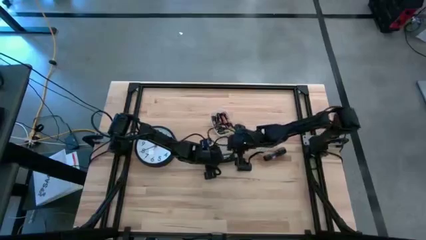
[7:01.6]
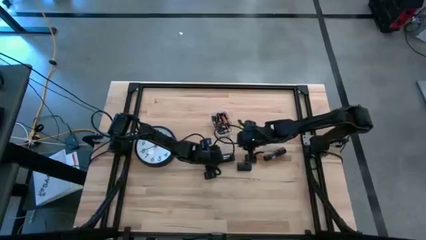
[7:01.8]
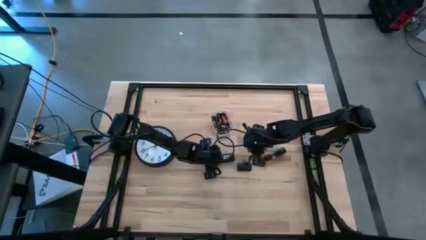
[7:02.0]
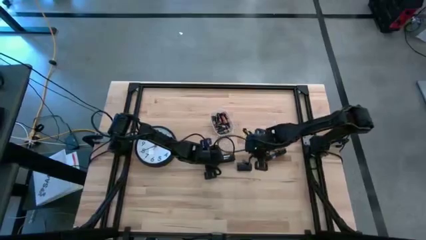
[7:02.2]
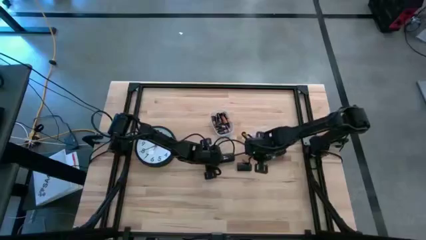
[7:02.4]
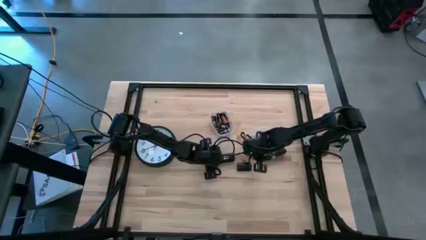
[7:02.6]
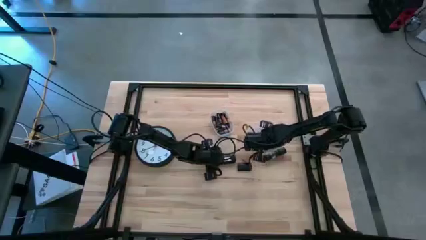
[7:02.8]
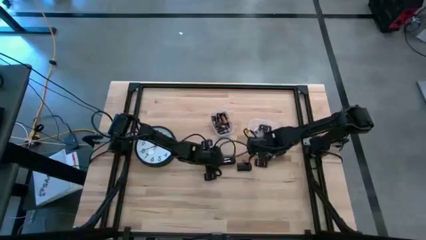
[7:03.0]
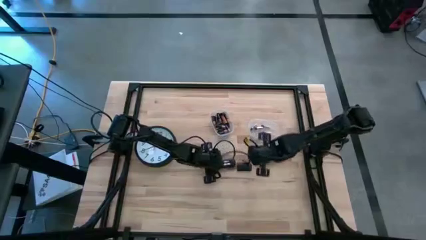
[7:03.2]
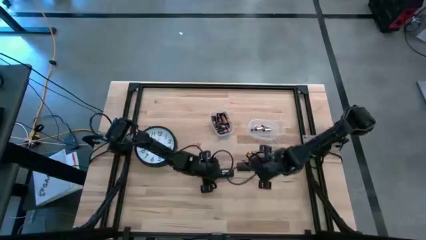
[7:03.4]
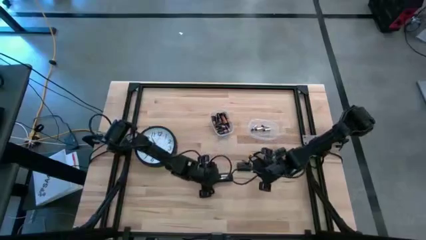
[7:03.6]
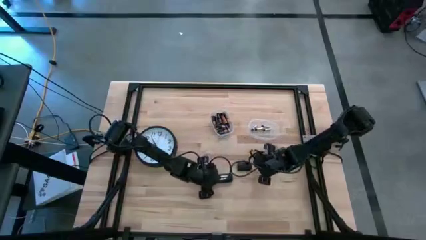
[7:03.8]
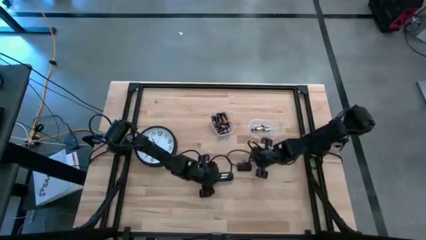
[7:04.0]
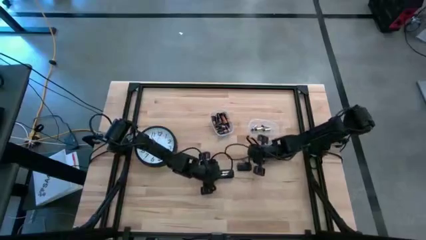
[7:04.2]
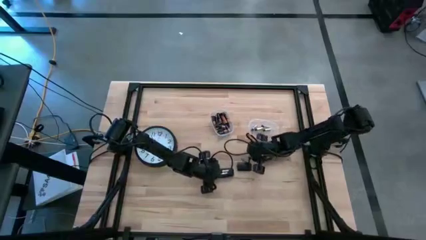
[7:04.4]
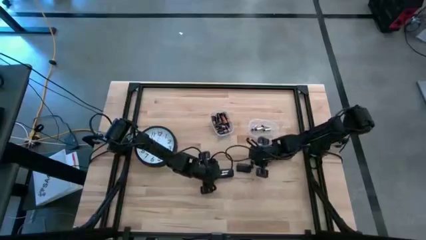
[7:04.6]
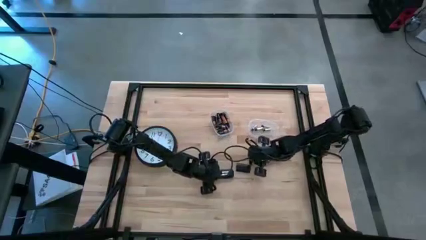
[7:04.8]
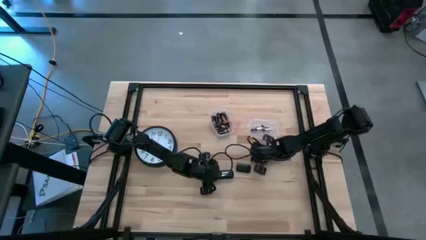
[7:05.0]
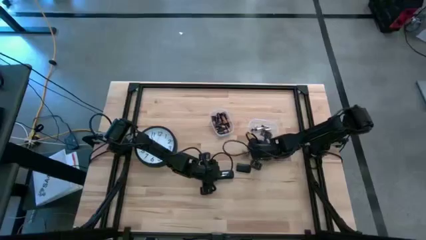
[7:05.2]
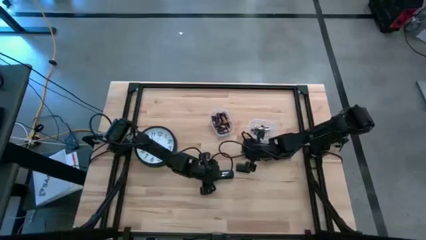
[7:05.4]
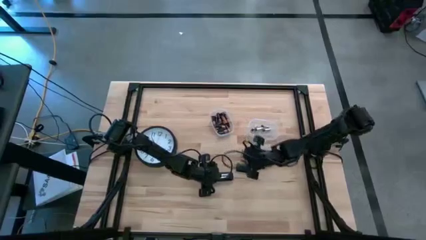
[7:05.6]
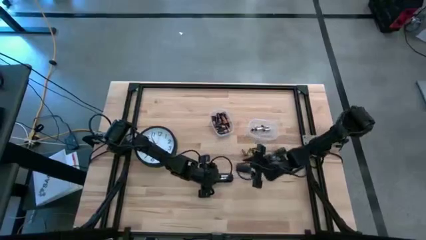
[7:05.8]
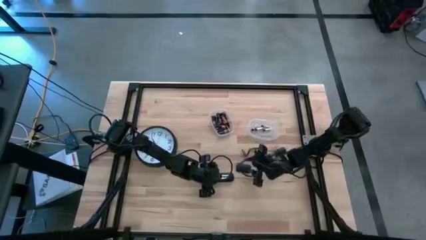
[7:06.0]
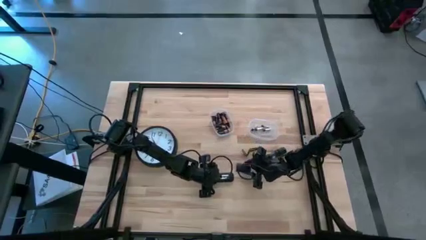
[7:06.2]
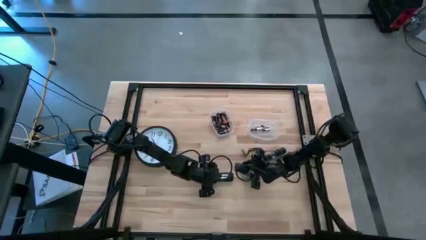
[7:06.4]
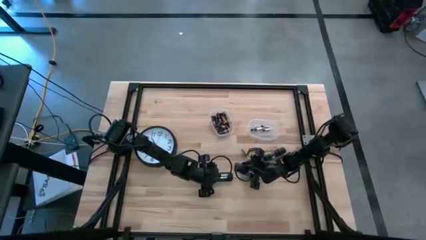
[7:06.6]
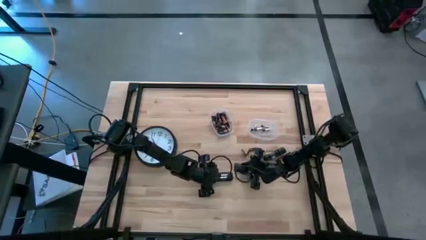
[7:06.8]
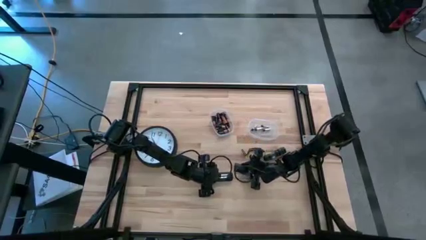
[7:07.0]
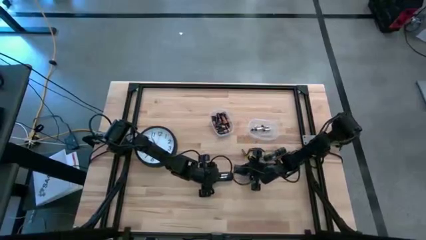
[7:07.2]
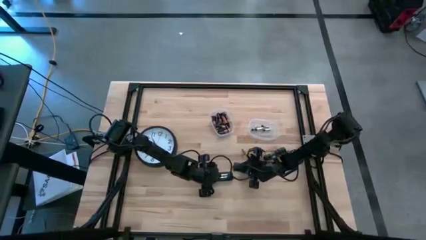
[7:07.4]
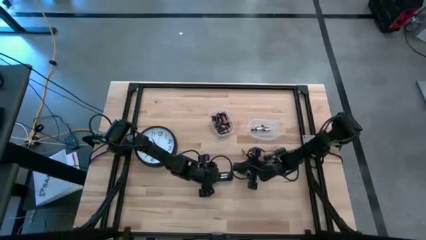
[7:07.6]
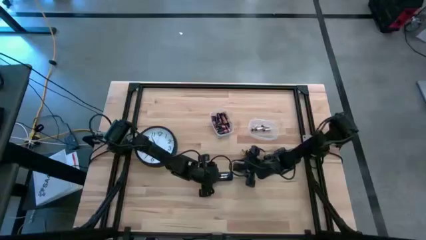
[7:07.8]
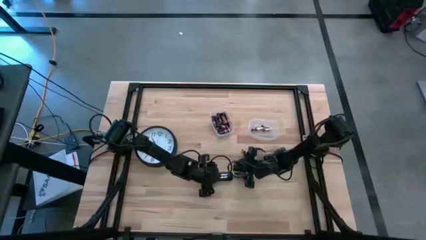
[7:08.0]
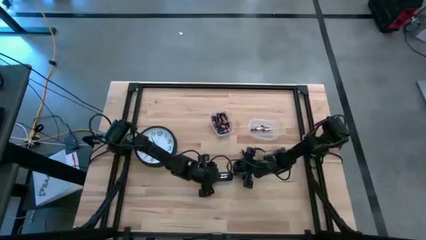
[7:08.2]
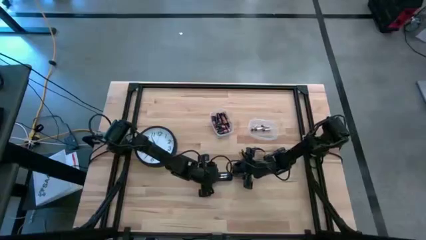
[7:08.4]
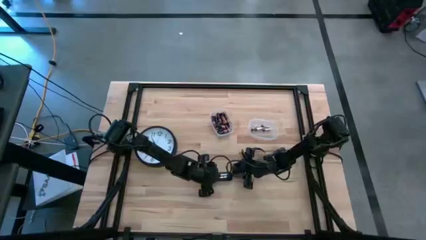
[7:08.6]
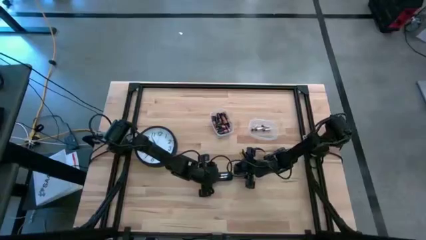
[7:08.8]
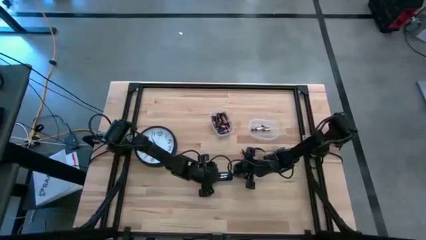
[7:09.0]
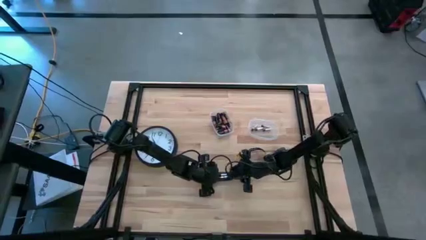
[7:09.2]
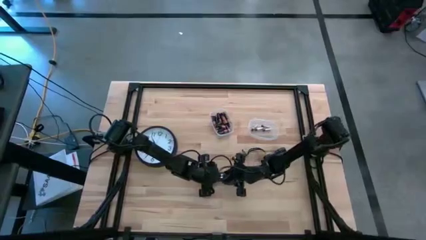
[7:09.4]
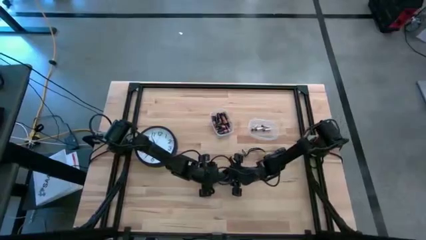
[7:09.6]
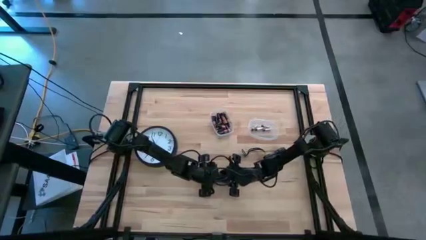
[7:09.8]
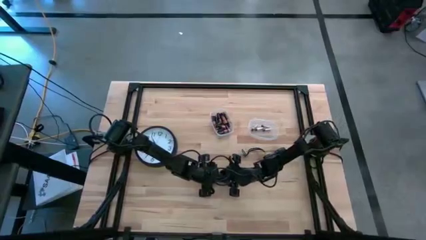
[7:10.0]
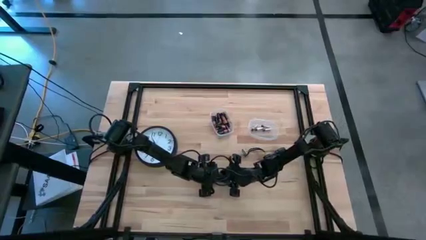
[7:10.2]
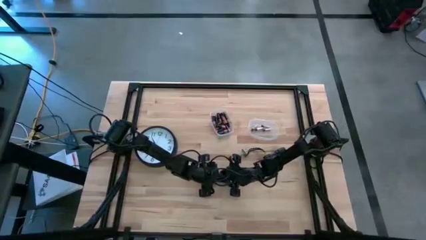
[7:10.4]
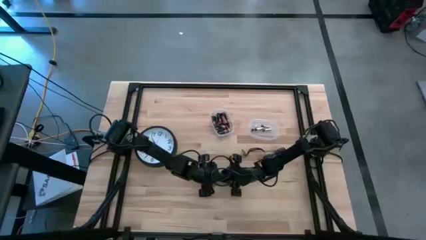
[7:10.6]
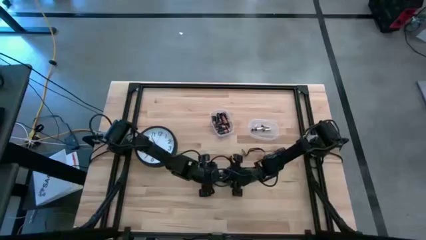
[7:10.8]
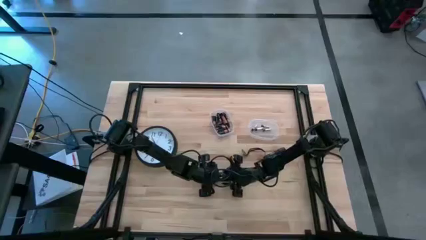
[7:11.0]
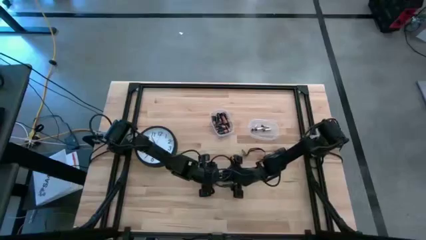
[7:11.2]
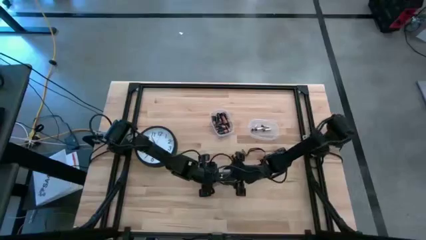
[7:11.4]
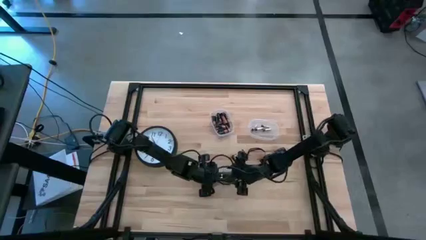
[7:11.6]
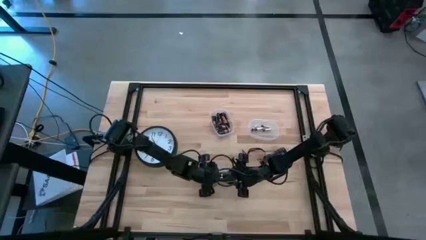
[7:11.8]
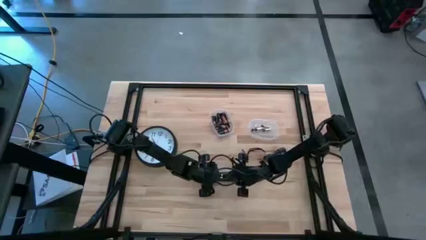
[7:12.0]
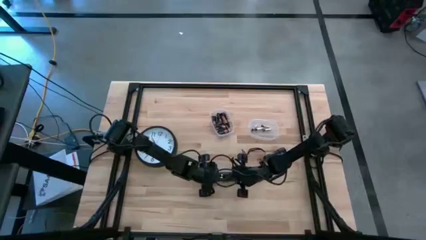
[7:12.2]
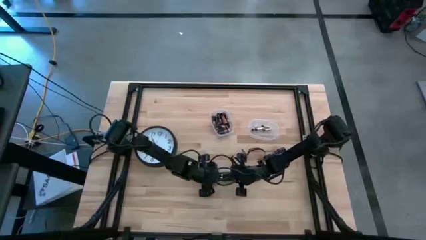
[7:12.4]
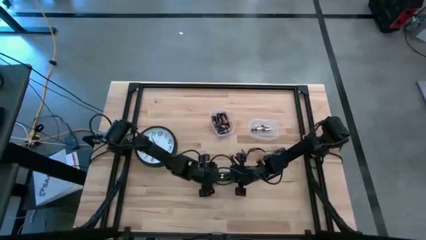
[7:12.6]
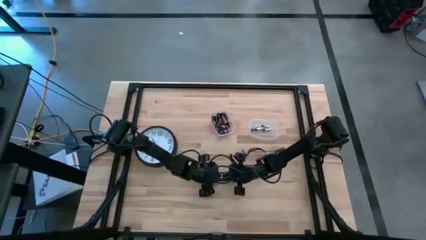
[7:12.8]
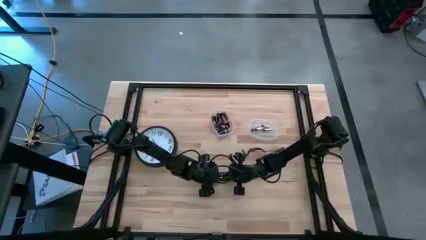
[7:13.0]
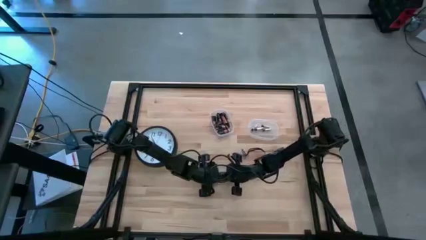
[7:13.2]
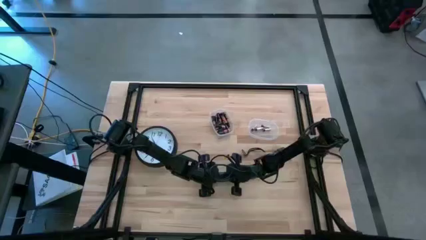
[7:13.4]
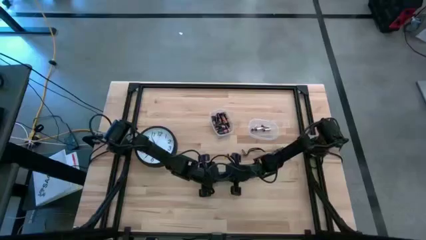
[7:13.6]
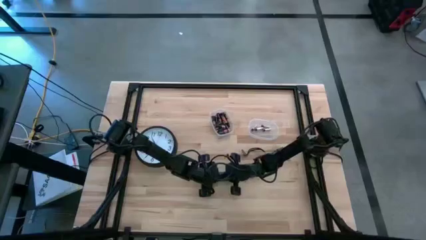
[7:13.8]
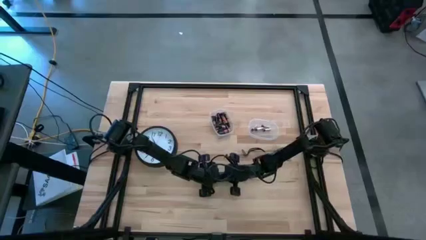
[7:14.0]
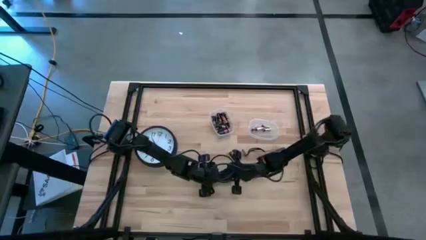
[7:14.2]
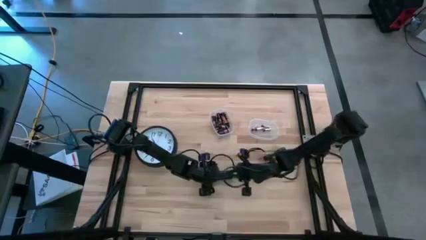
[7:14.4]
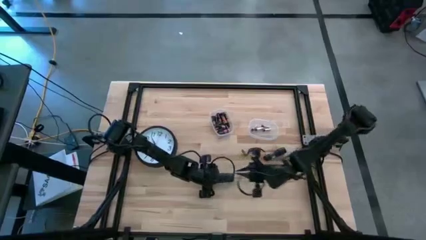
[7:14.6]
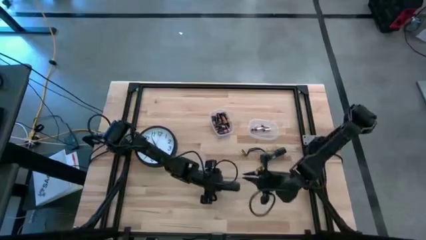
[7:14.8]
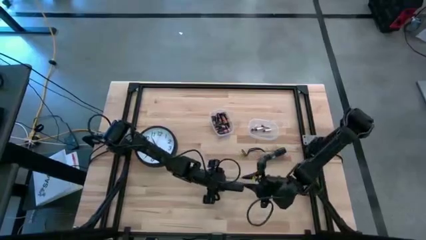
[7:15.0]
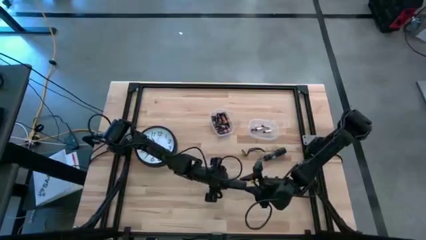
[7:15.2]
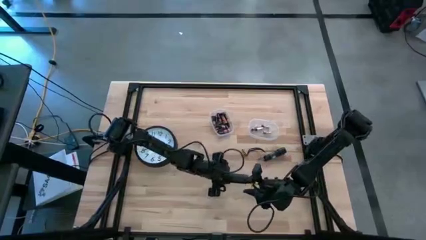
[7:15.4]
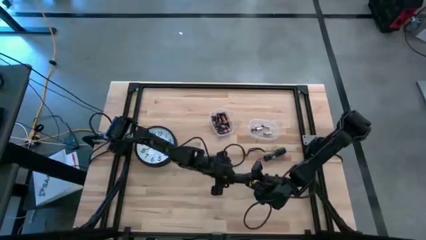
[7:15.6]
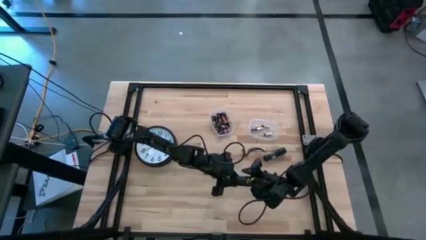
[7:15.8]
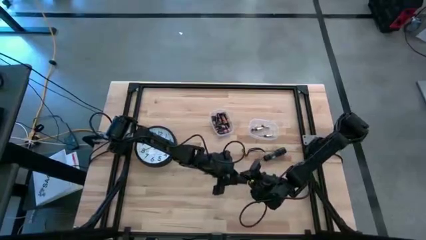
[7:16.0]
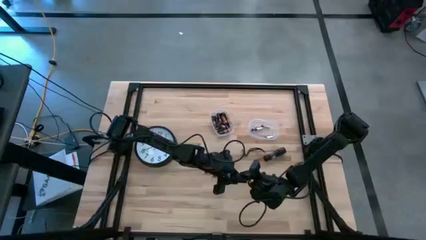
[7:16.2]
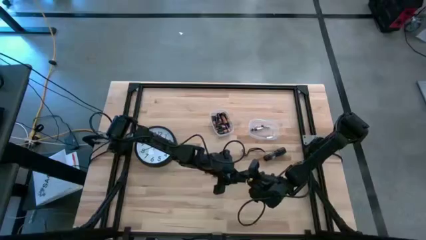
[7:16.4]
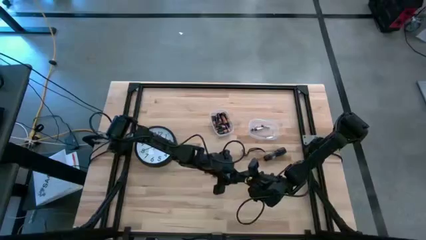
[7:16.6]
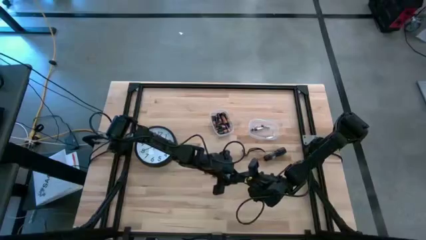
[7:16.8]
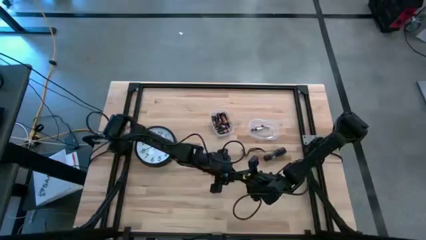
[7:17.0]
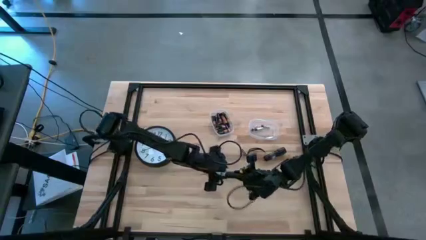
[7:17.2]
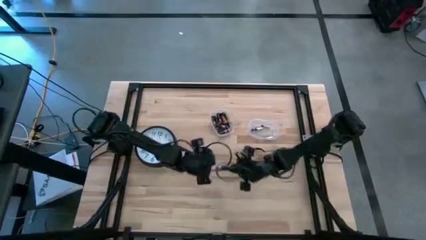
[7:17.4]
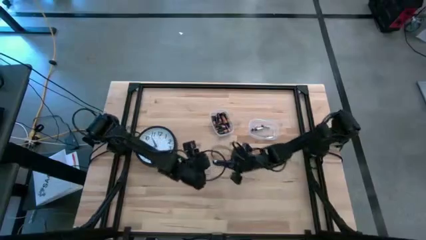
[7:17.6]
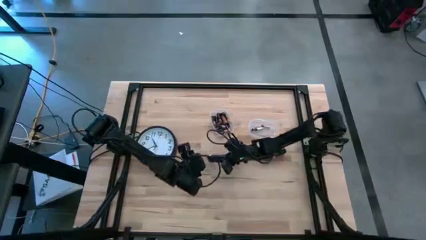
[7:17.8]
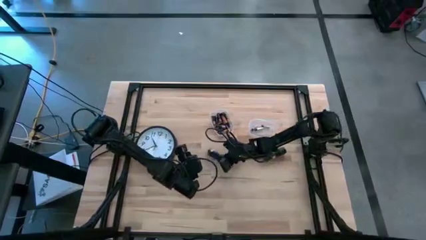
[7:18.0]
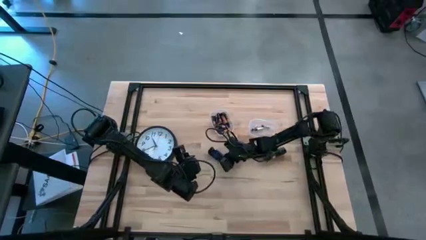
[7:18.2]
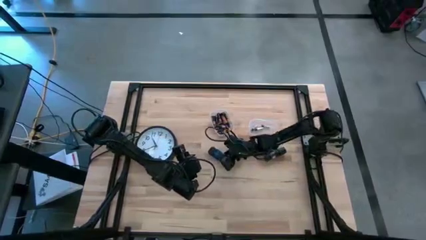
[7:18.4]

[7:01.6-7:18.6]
Task: Insert battery
Close the battery cover of the black remote
